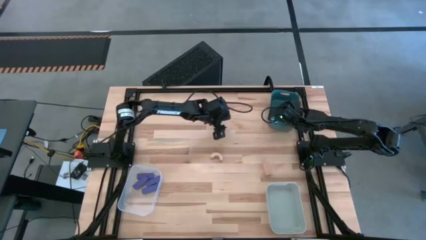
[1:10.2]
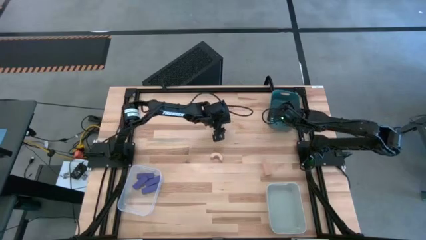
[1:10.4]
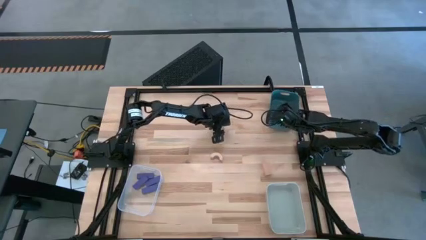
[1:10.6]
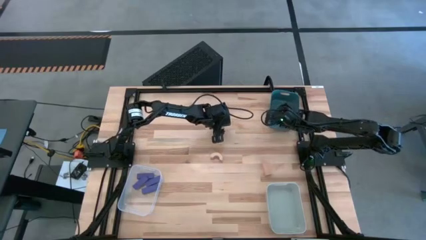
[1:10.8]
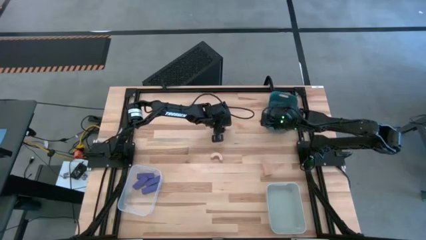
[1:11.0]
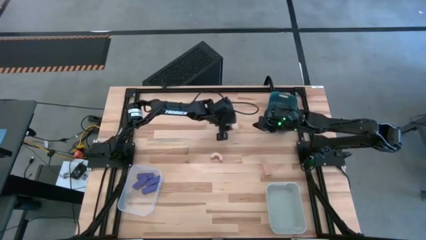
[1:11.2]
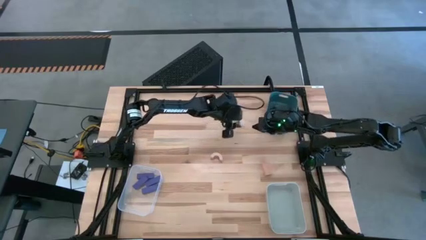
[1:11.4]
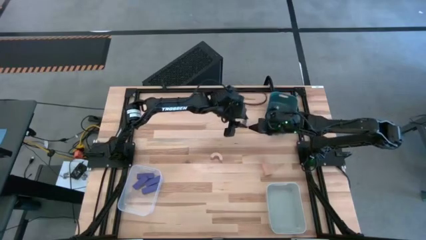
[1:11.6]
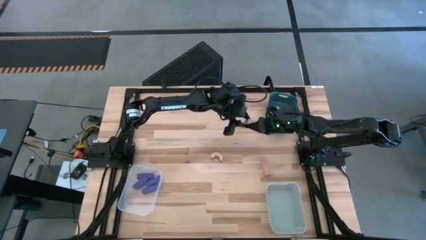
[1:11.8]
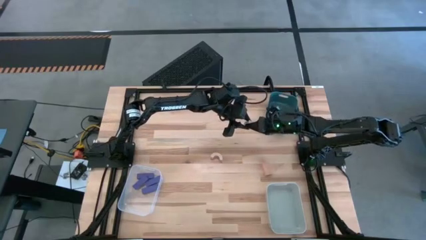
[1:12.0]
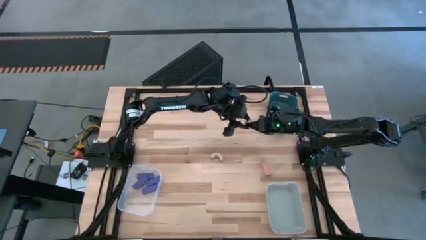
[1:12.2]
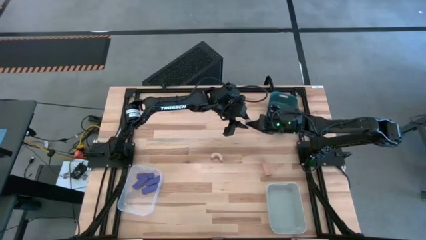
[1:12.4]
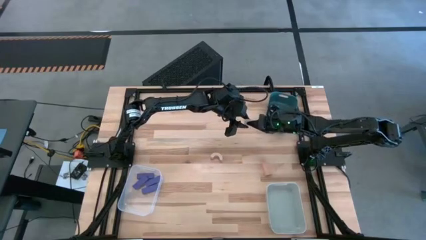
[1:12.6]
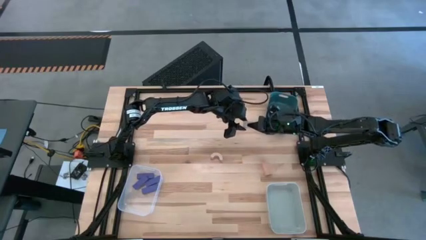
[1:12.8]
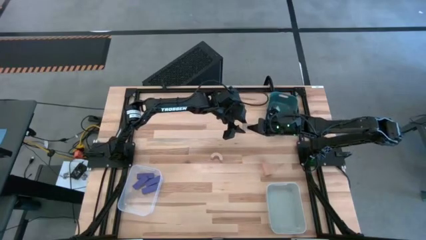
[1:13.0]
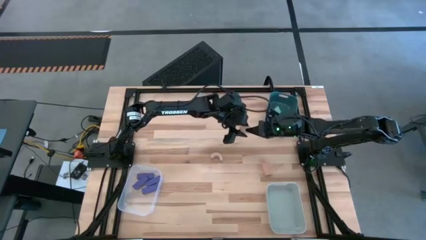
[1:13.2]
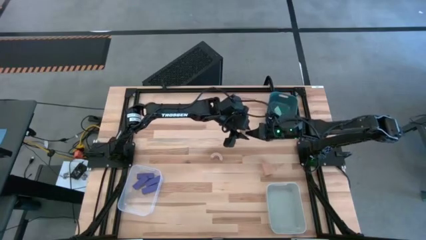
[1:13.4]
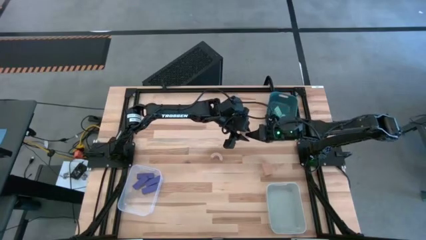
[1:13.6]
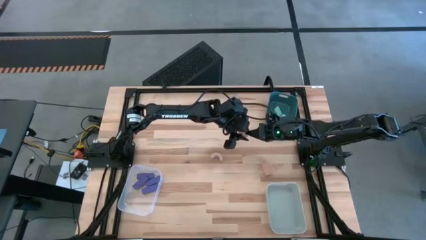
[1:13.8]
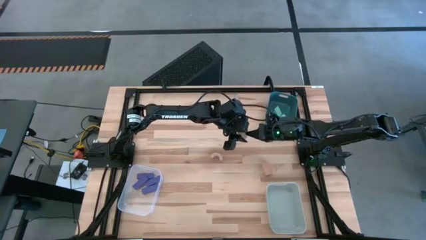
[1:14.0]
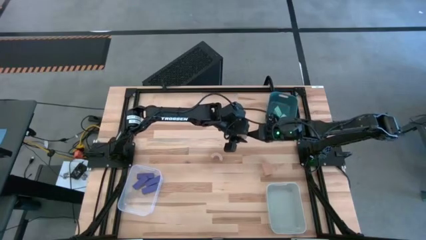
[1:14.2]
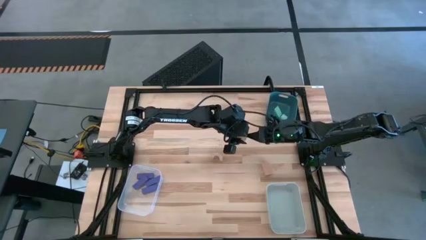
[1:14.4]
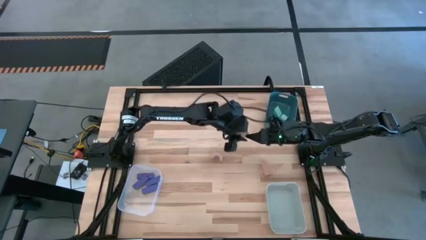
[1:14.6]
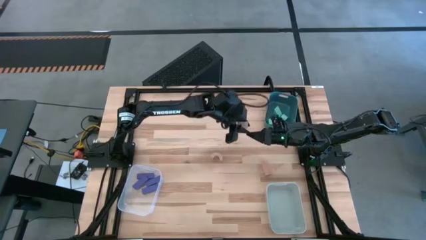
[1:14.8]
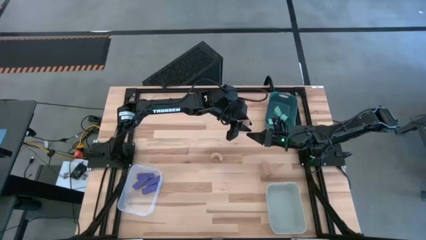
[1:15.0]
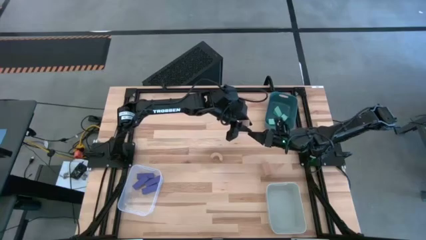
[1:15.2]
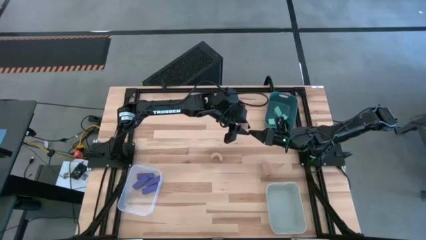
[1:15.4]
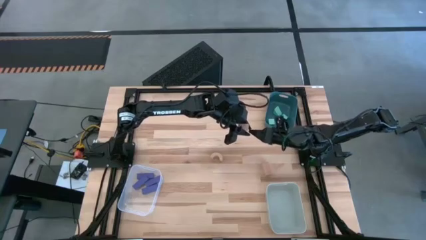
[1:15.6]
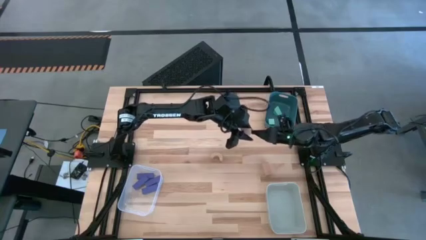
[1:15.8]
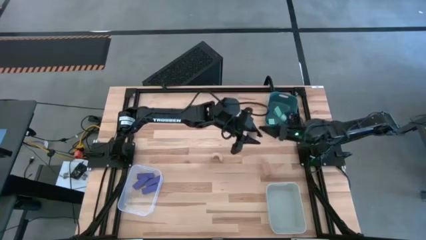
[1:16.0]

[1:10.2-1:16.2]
Task: Sort & place blocks by color
Put the top brown block into the gray bin

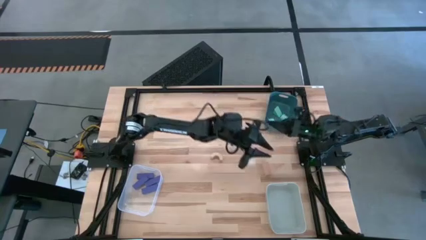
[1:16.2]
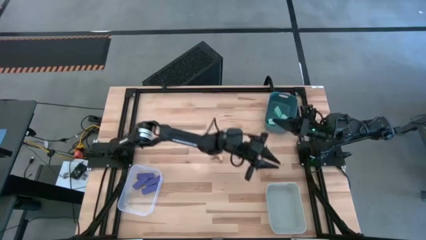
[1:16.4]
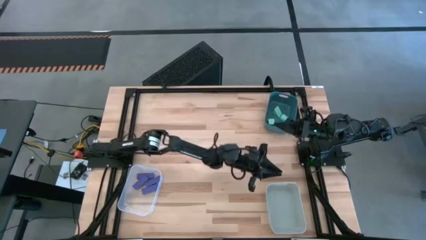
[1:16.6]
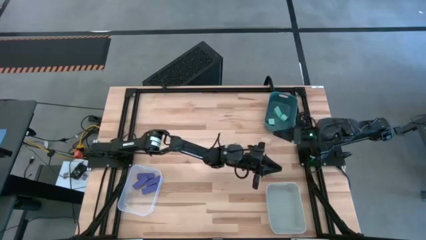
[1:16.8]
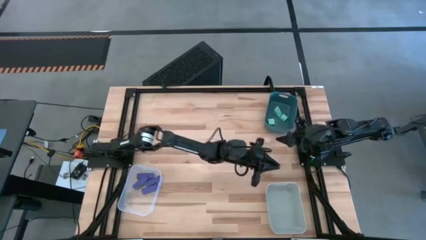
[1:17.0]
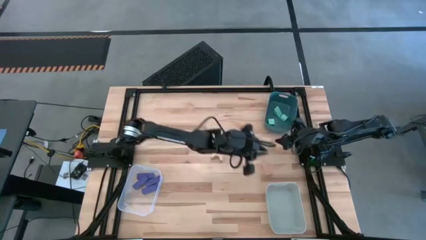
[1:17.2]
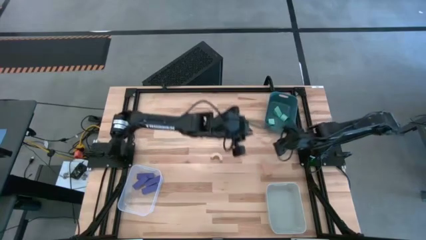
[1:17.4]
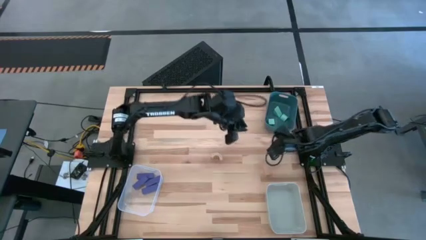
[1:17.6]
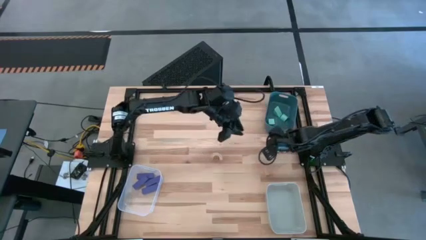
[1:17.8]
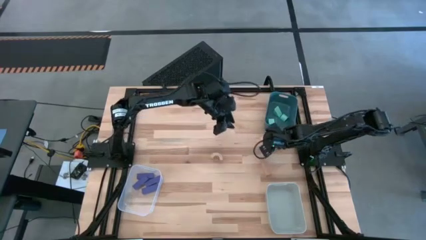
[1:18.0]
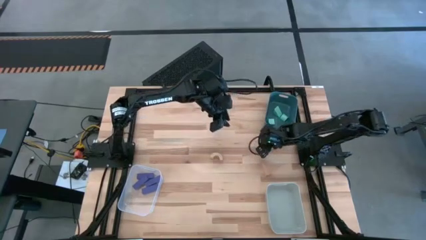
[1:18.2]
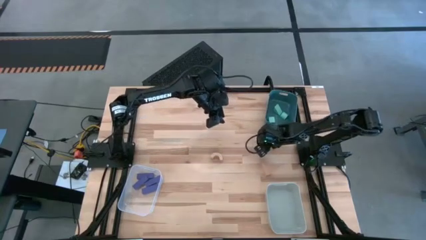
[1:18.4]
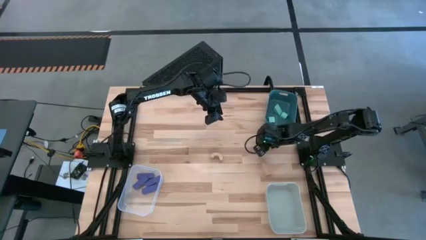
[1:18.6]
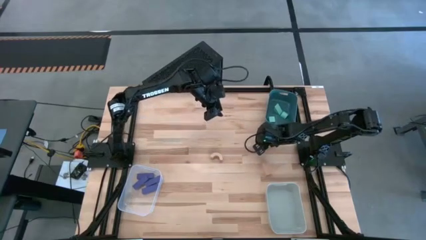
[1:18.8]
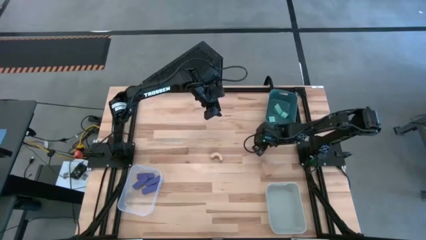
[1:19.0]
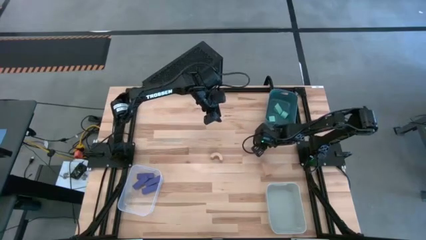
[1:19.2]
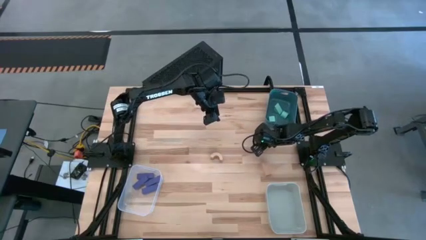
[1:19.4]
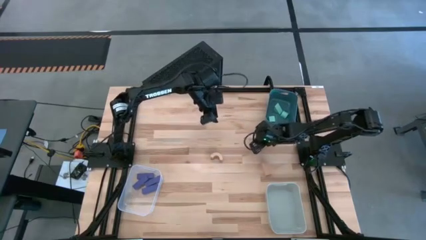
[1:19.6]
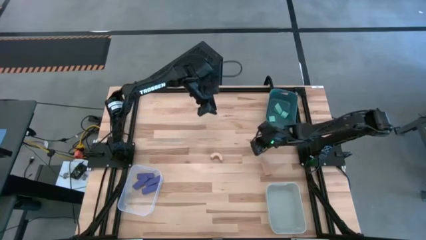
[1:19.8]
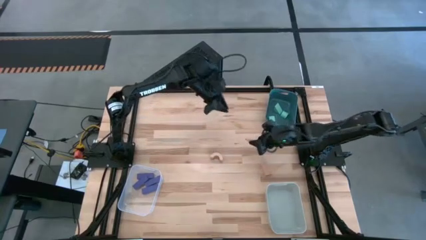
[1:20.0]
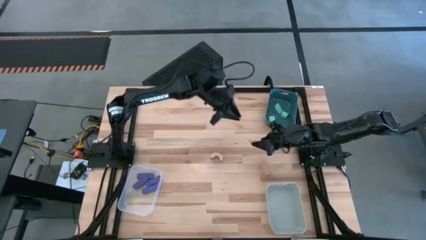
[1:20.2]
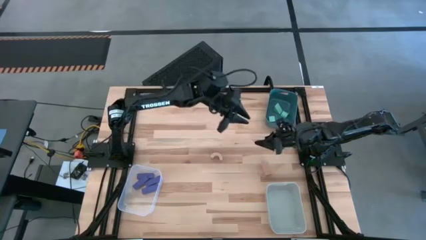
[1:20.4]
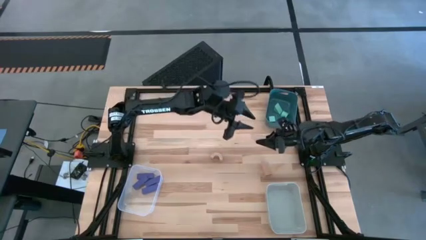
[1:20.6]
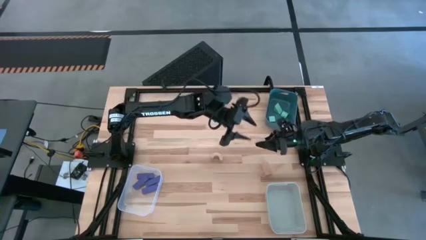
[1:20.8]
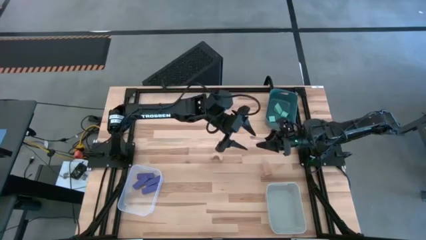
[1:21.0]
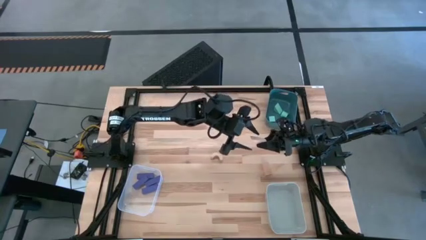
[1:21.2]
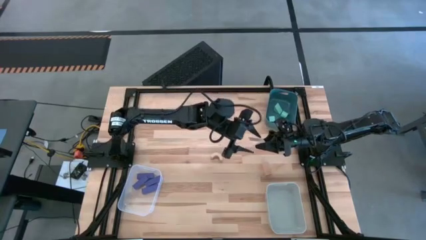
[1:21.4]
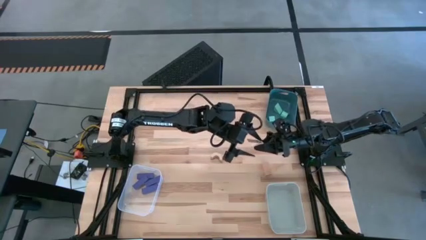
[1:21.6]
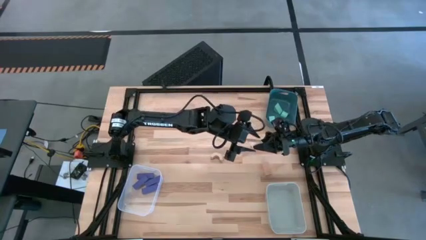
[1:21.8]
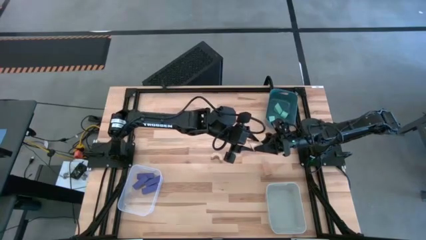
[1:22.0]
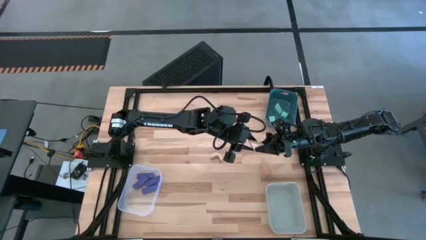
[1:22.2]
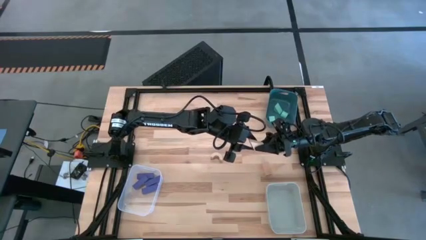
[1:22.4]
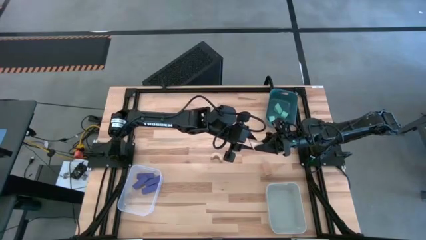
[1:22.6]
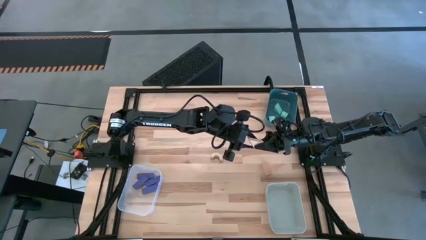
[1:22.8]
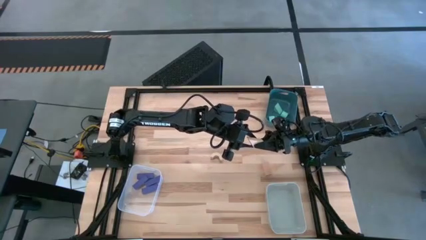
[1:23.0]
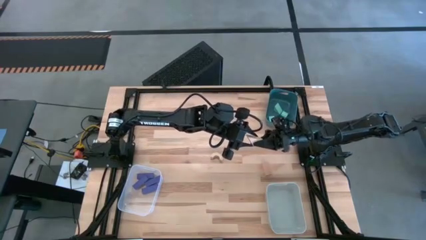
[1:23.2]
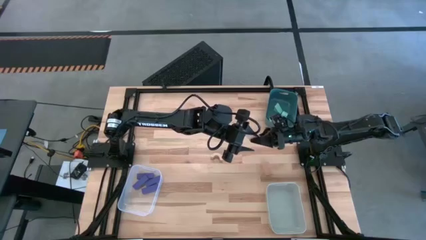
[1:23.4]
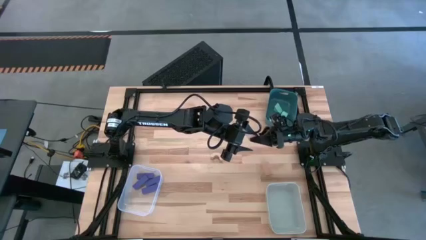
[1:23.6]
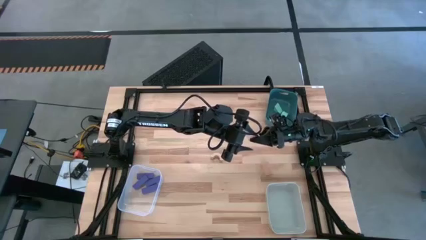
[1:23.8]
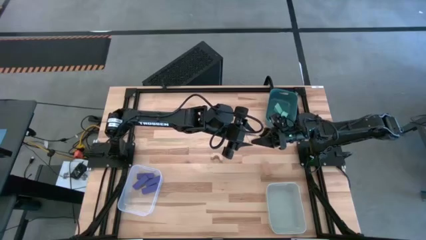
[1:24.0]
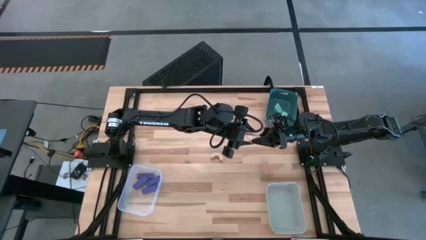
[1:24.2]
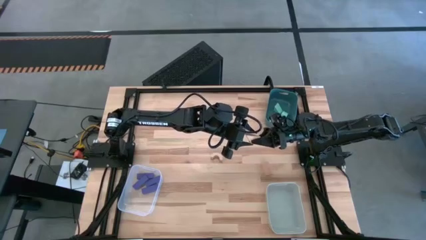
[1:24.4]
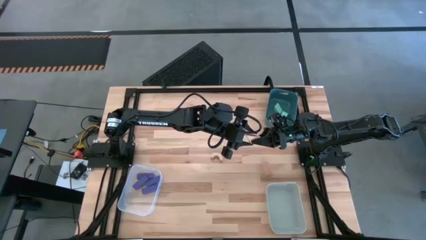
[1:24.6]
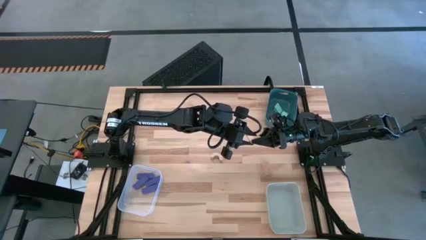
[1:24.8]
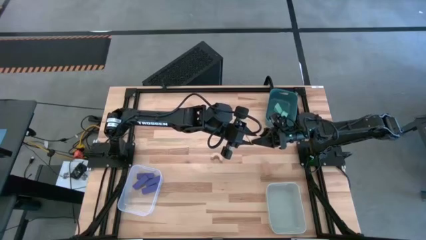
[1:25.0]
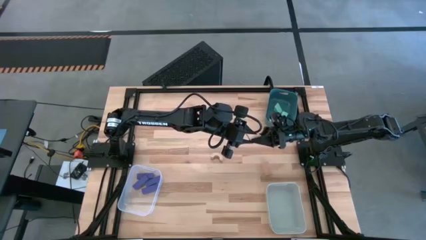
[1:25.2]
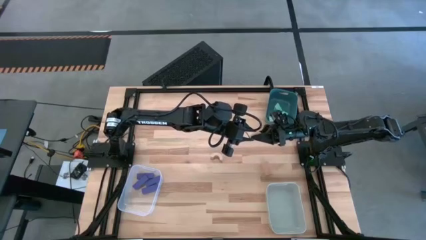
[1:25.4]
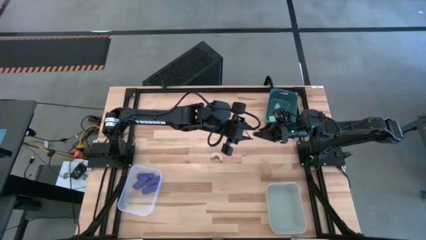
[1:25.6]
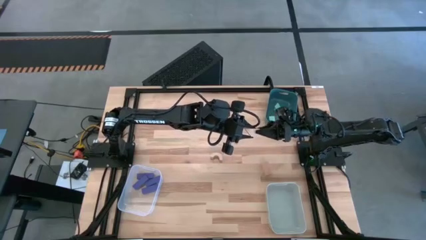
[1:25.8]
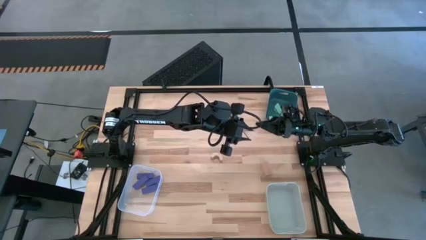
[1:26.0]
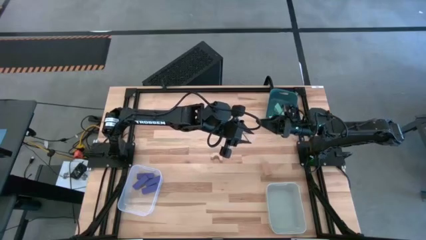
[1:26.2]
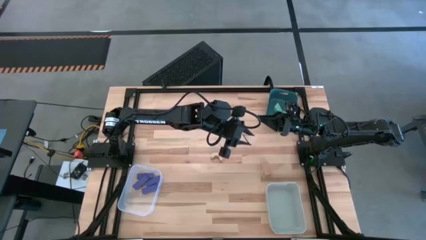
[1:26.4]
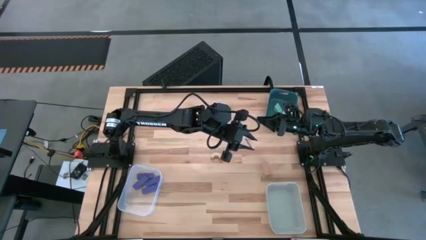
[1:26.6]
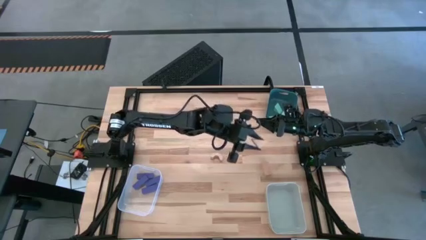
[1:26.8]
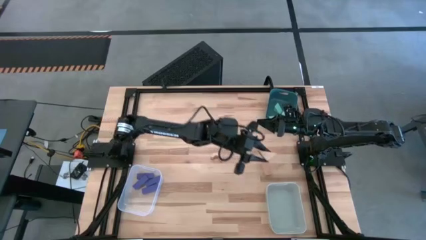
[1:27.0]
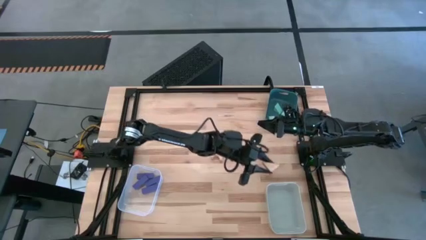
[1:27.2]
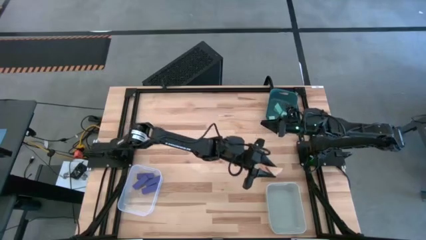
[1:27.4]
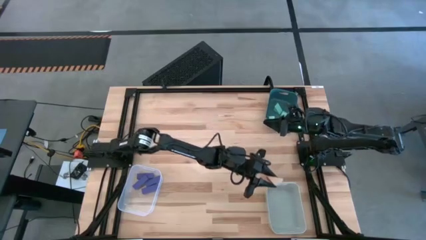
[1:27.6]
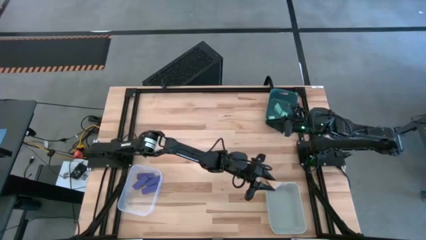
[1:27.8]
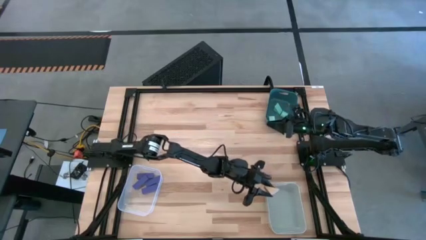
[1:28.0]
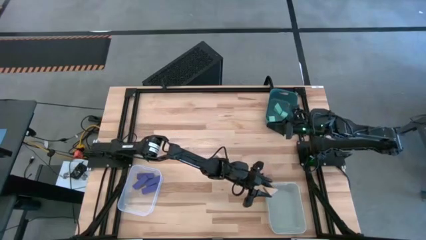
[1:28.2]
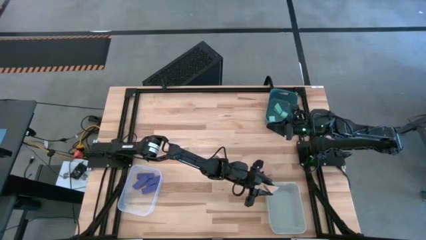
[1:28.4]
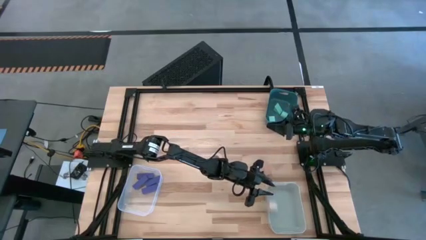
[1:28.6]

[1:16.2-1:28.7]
Put the top brown block into the gray bin
